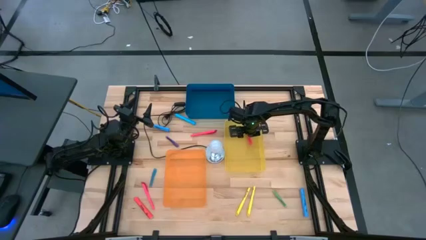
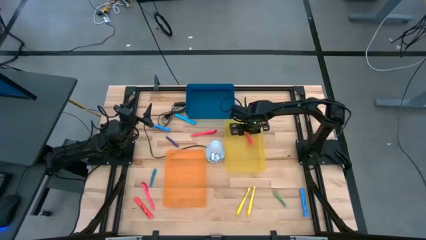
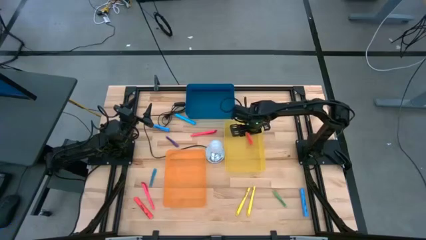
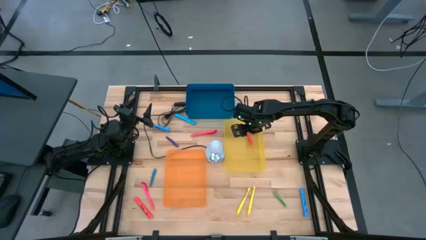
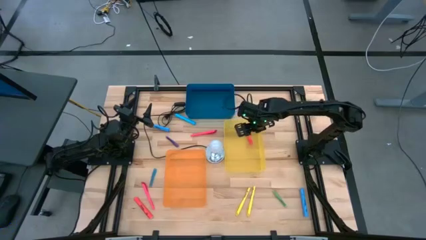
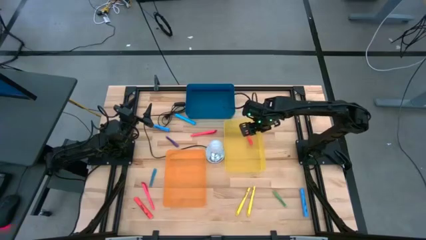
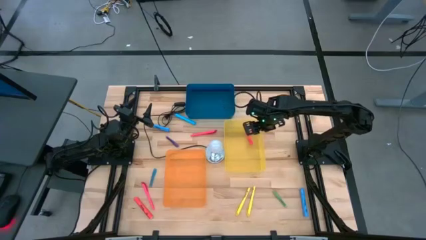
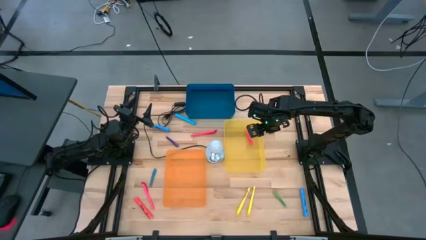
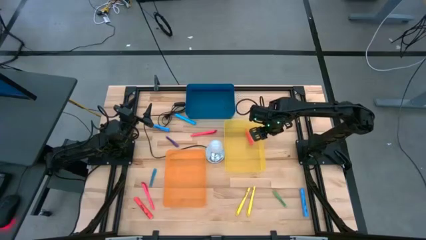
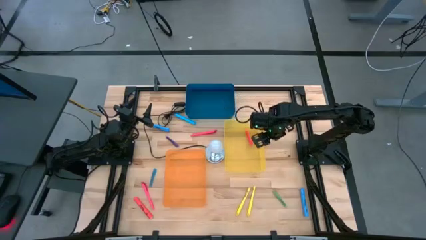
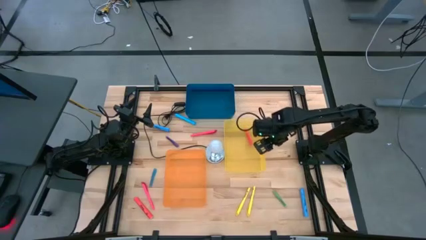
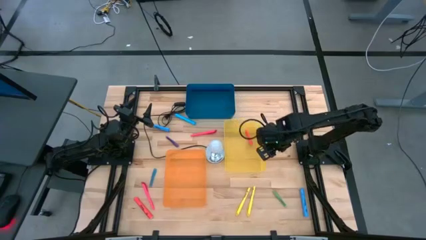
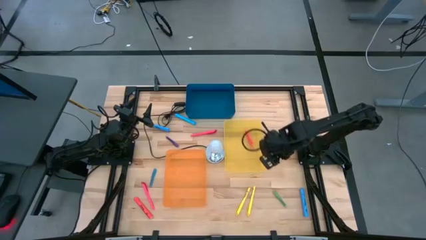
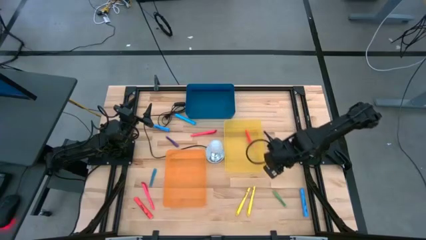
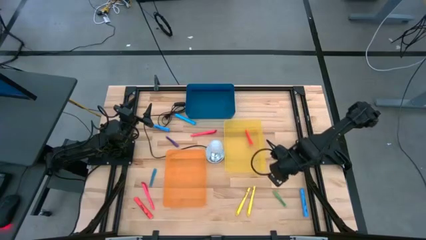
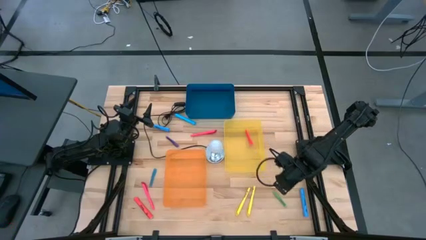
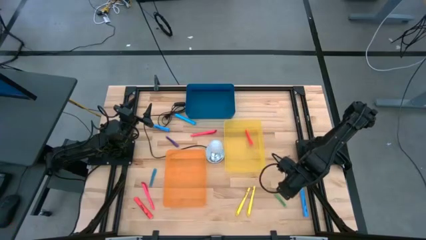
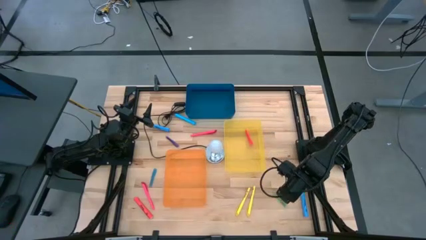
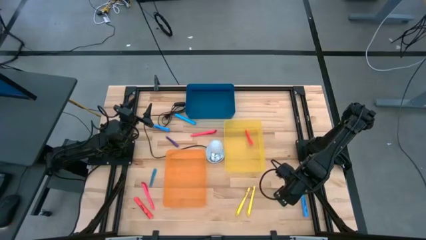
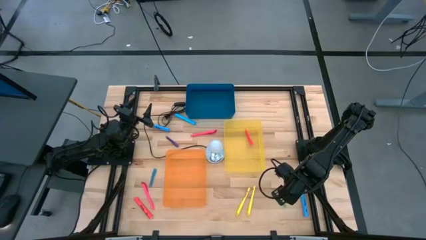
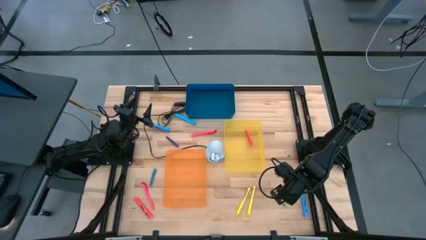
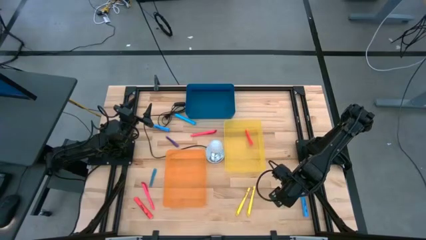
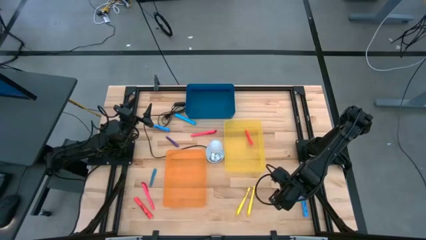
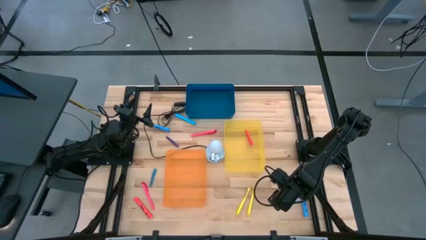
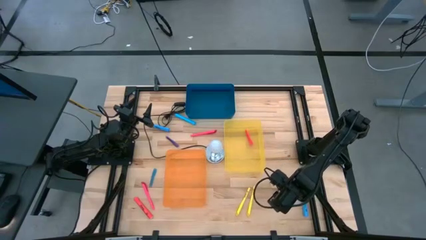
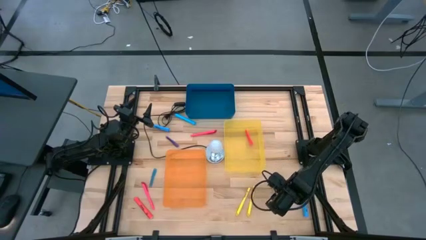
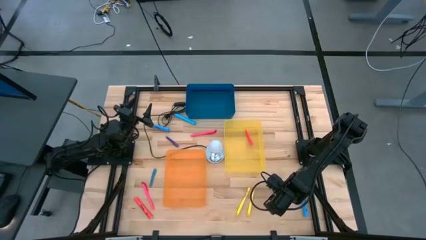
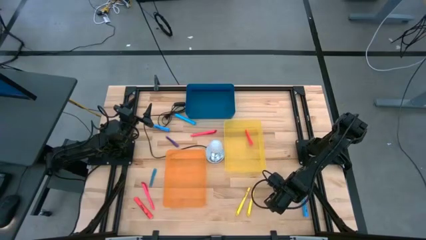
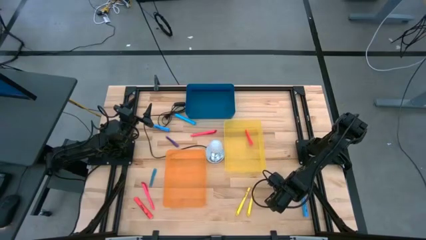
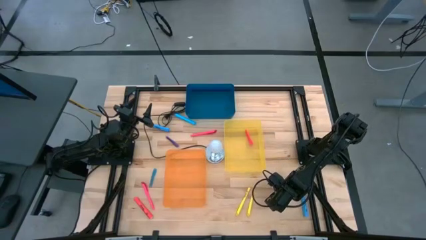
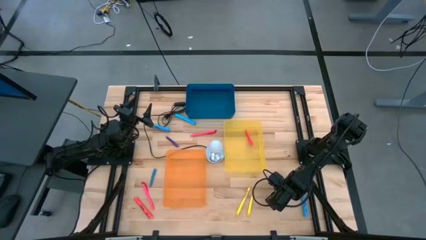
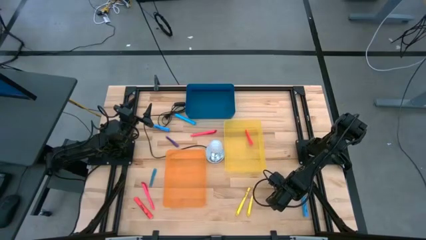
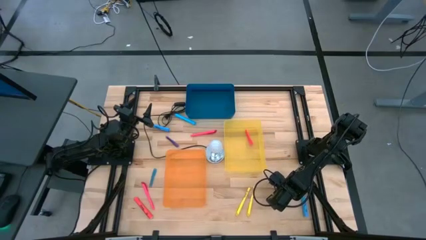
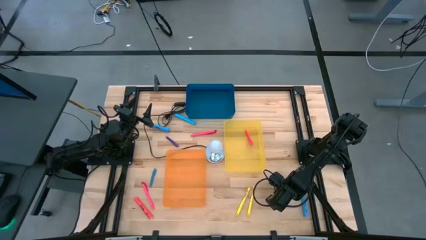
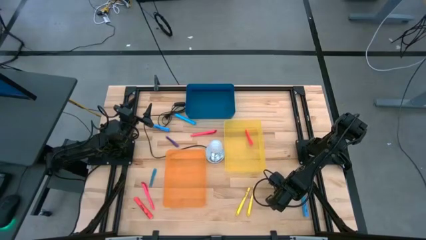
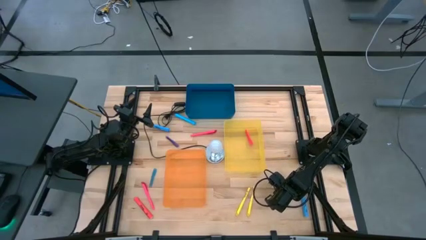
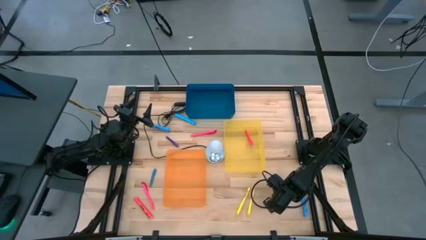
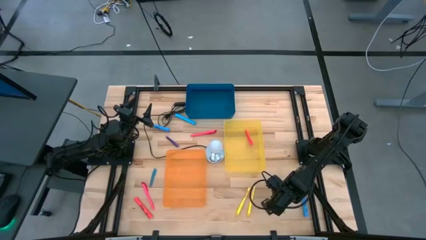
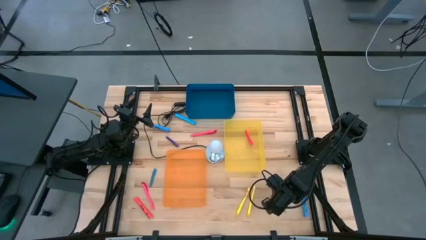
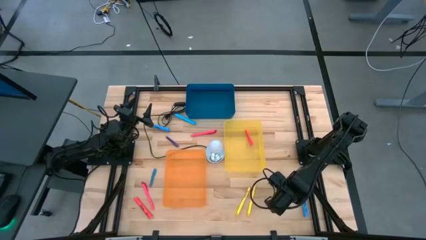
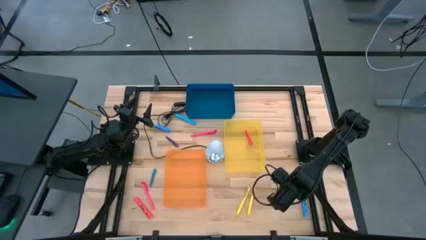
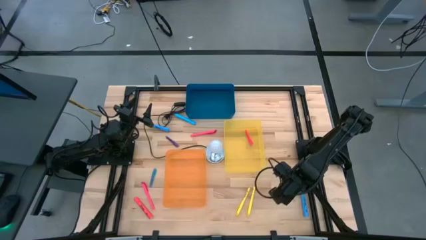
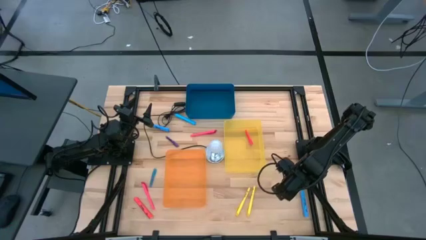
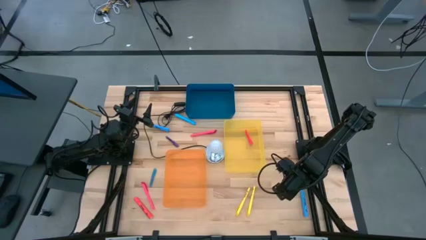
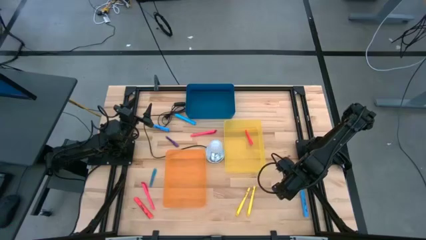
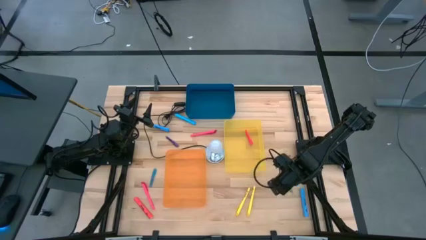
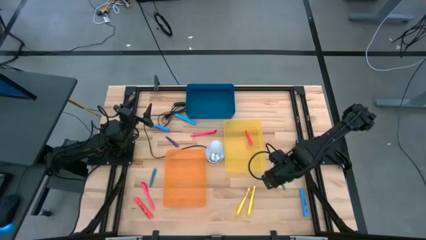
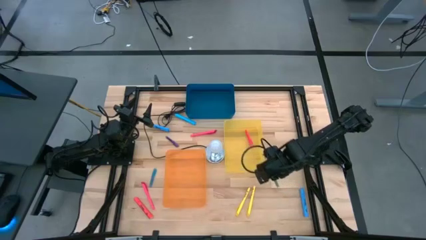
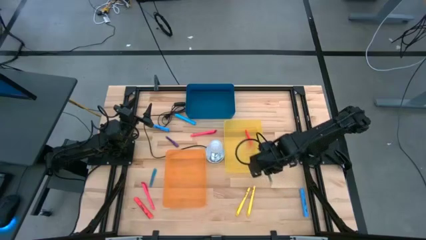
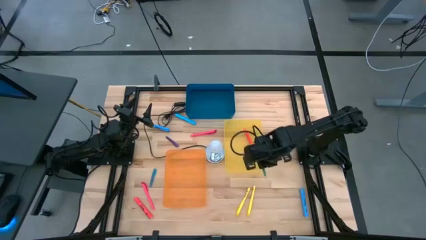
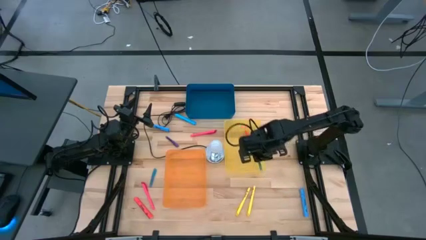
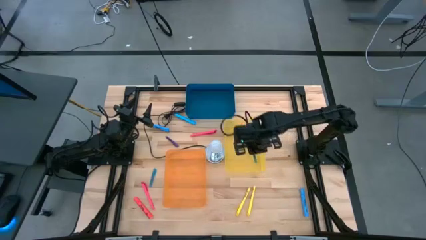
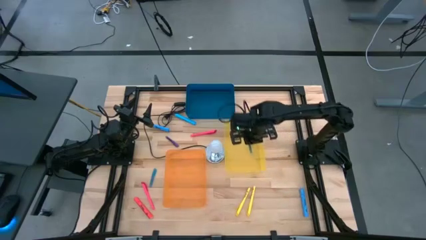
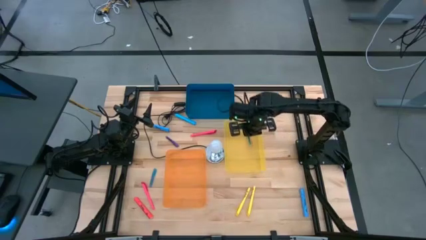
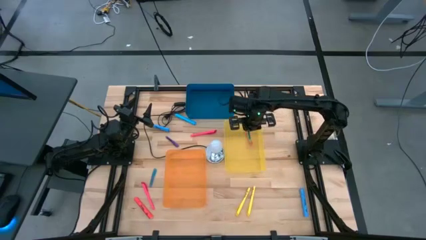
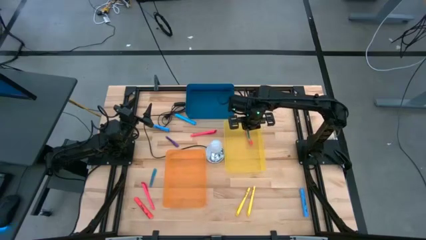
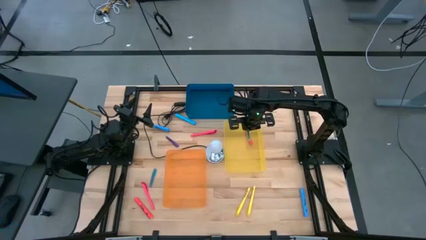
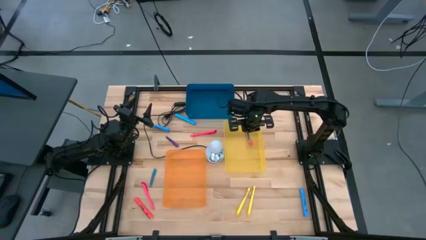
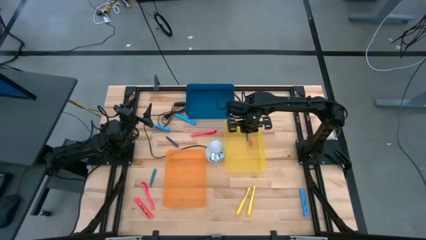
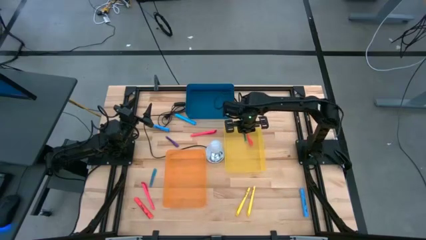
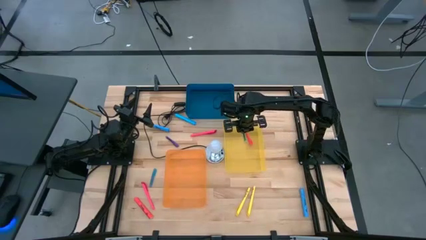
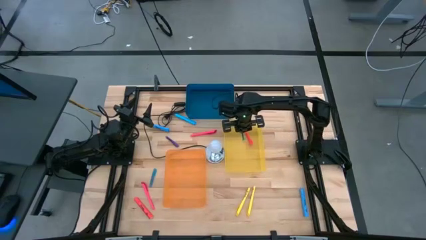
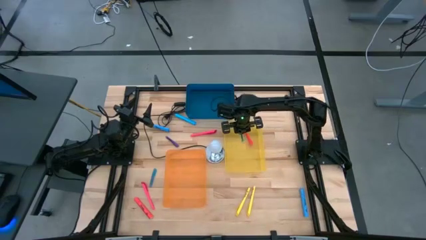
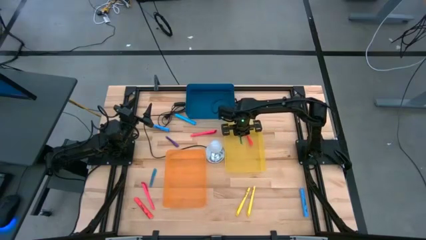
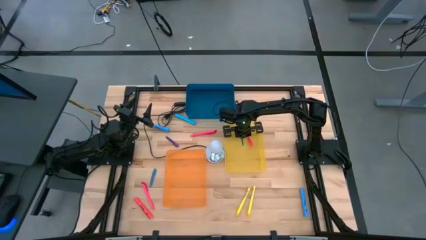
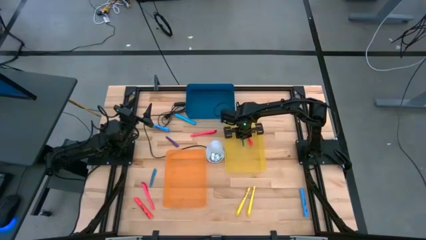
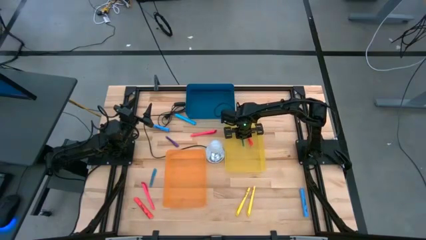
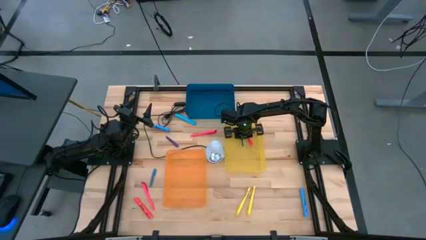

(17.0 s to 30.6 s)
Task: Pick & Place Markers
Put the small green pen into the yellow bin
